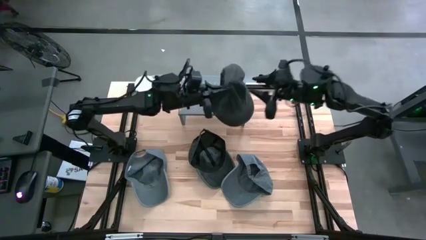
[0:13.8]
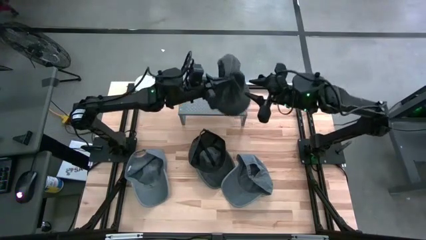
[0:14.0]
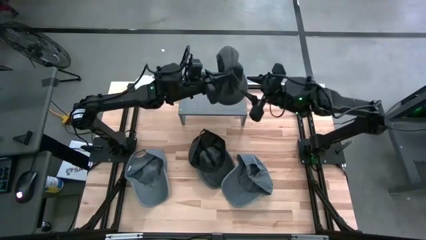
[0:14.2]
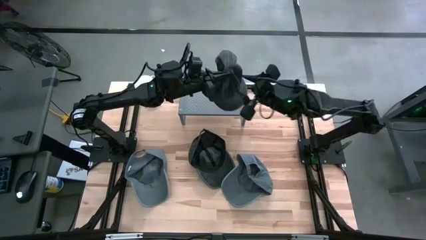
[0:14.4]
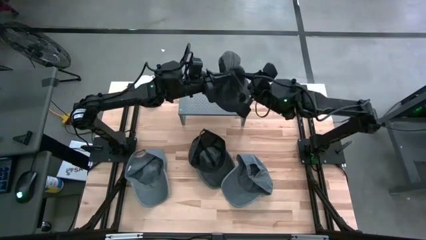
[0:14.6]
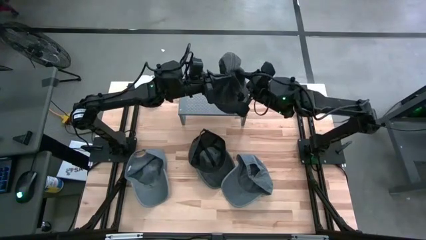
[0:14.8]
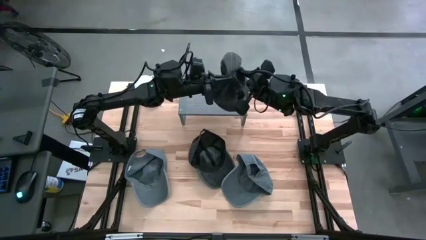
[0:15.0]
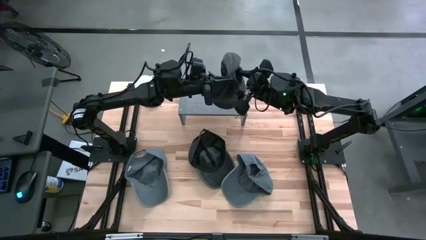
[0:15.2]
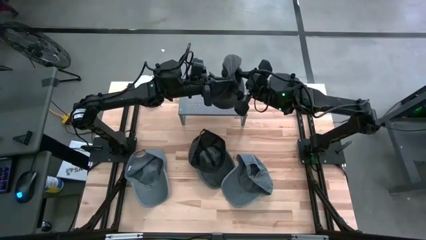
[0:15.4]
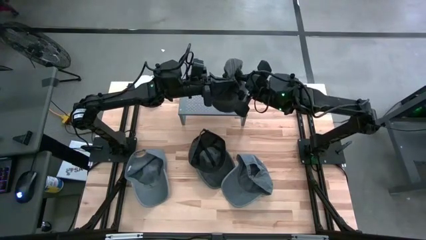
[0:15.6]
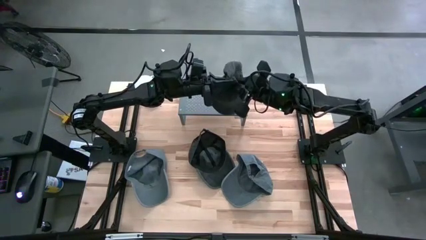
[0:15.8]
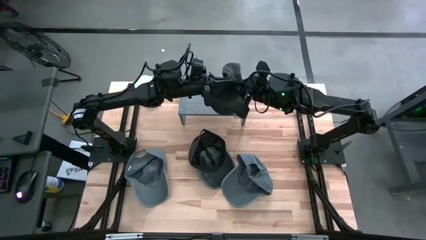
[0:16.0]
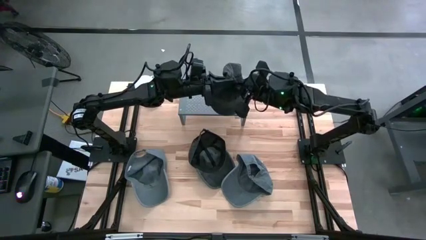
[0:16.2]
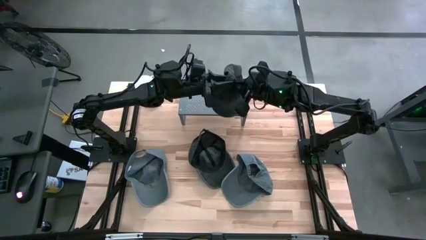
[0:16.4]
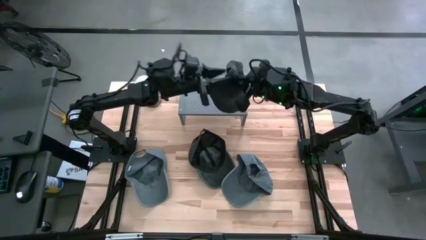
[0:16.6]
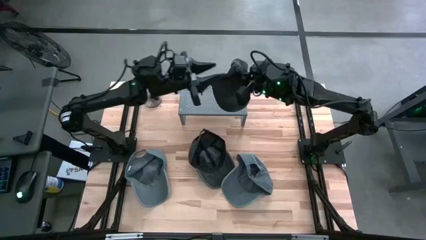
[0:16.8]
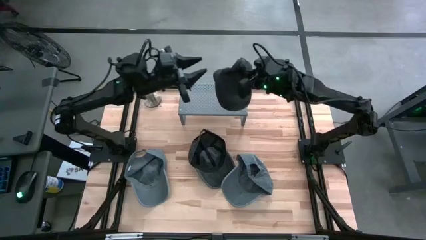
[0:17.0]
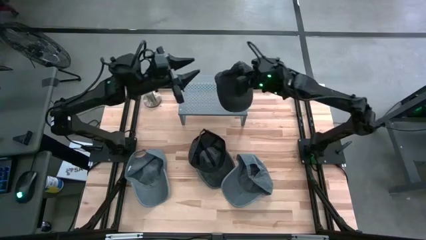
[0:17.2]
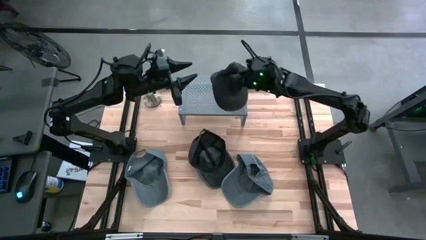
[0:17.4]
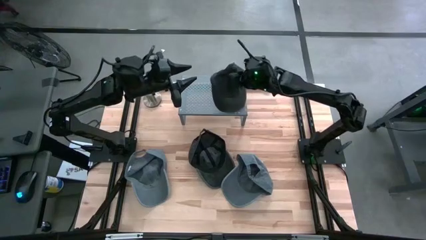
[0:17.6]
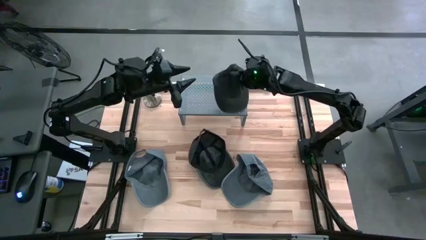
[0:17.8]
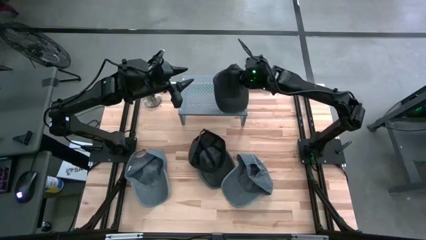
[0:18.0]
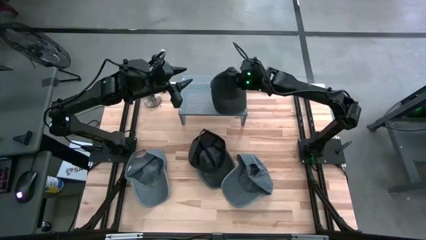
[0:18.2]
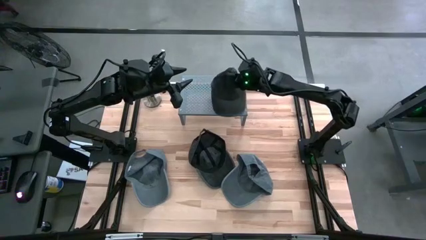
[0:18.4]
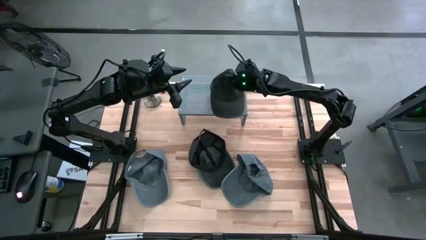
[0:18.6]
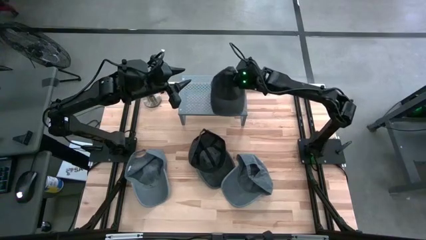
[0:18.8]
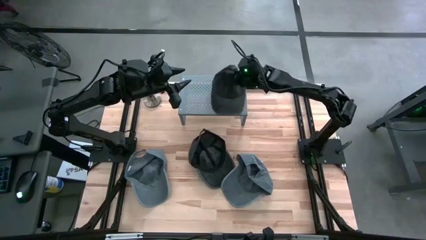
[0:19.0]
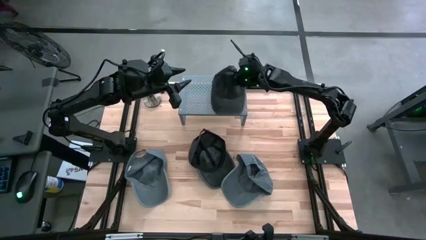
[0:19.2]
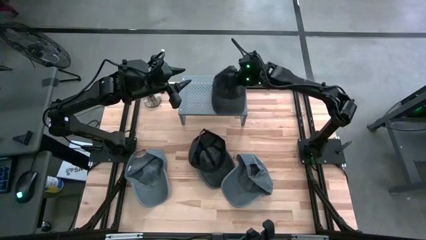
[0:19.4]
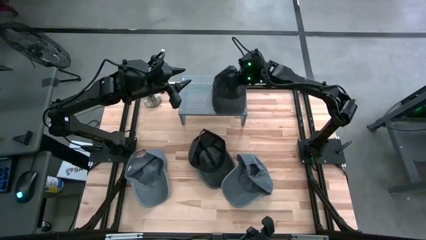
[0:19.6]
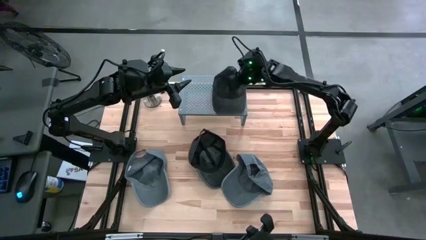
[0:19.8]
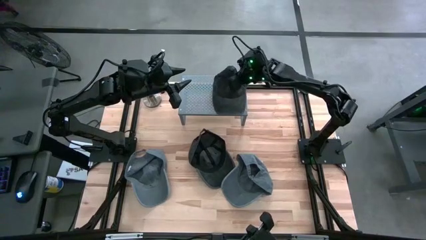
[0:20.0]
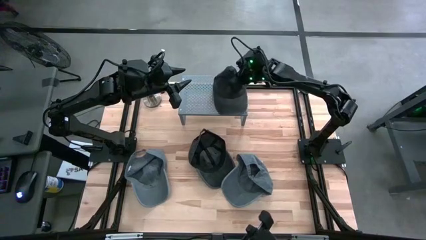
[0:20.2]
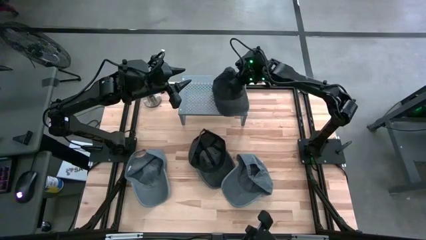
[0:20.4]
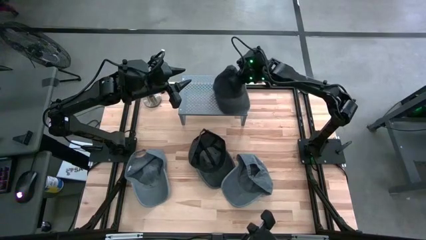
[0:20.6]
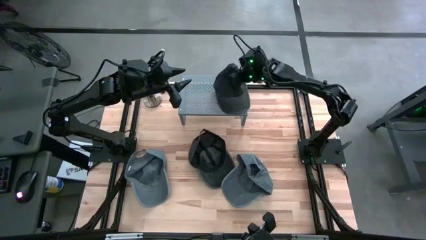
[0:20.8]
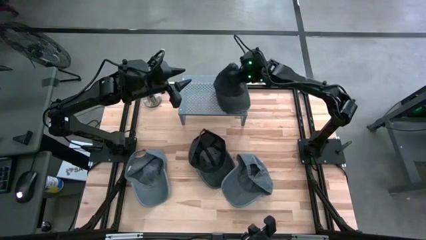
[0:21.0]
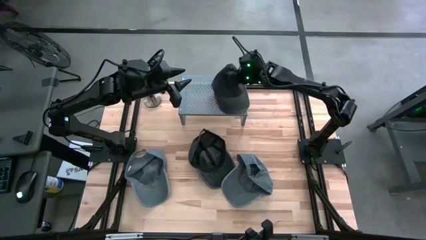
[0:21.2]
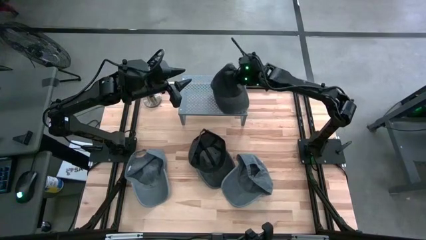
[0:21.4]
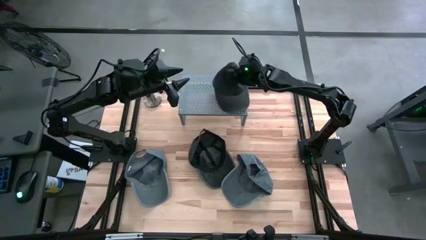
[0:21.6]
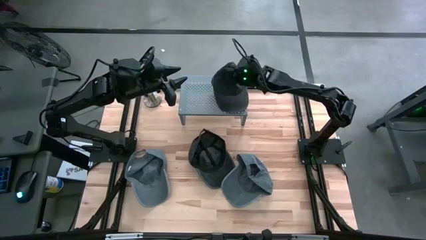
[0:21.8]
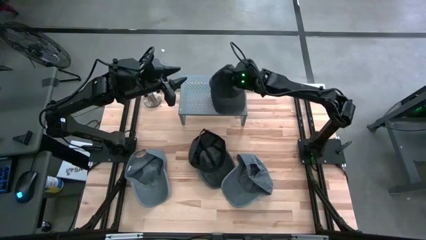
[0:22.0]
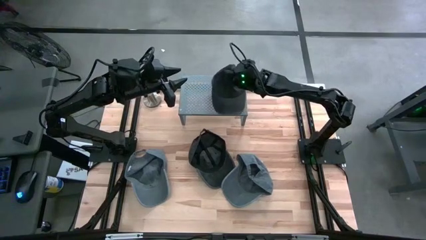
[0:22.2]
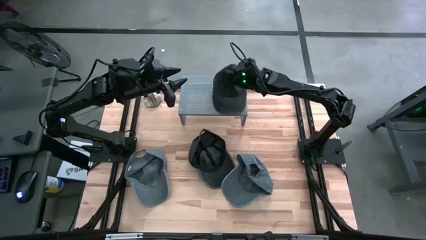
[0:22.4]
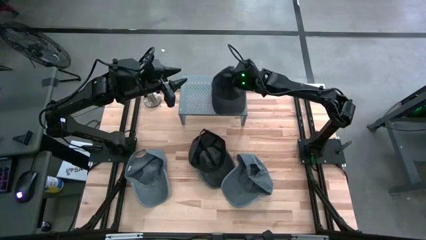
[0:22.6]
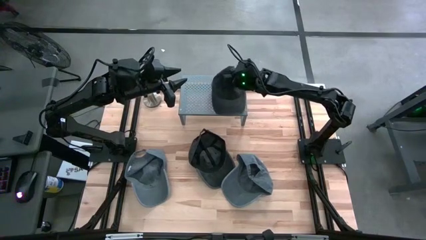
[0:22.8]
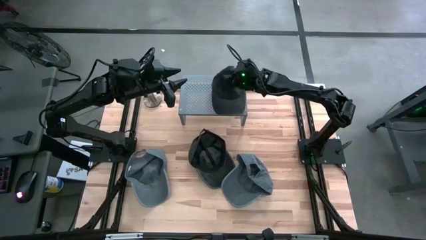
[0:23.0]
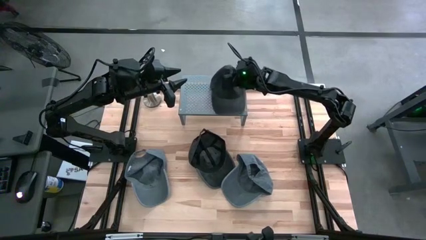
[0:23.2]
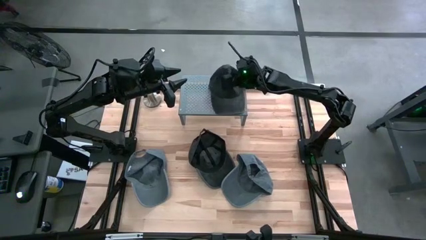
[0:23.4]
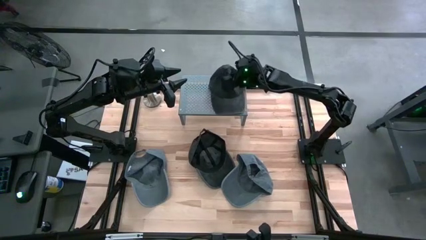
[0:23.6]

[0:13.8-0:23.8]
Task: Pick & Place hat
Put the right black cap on the shelf
